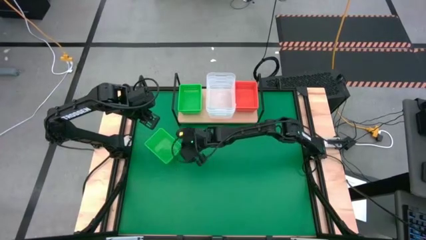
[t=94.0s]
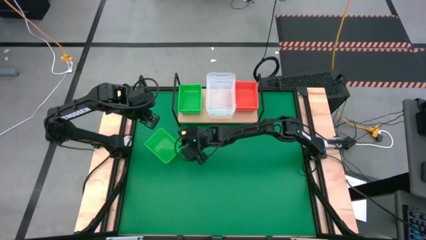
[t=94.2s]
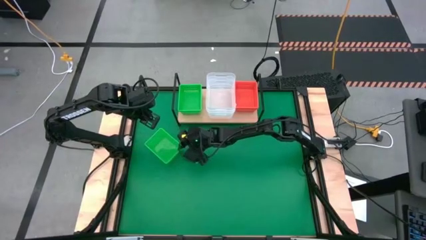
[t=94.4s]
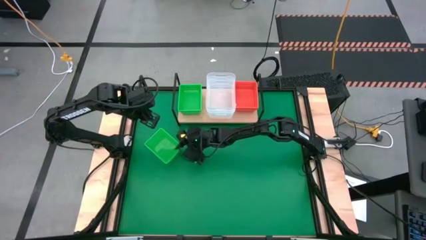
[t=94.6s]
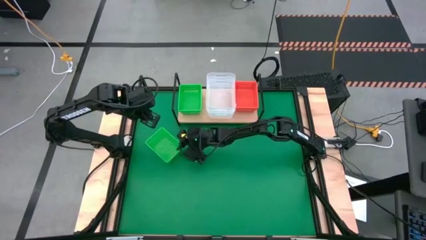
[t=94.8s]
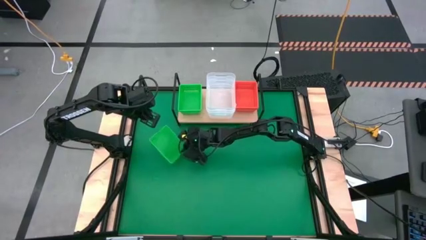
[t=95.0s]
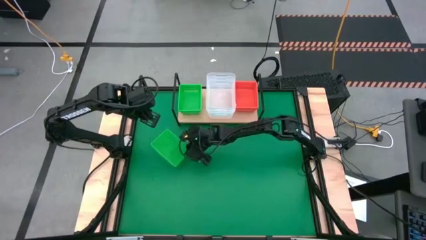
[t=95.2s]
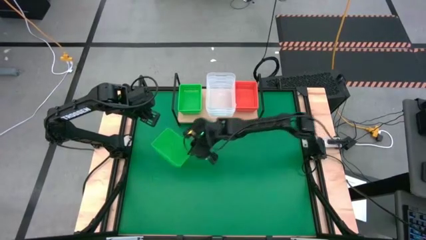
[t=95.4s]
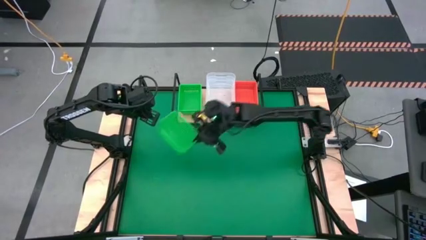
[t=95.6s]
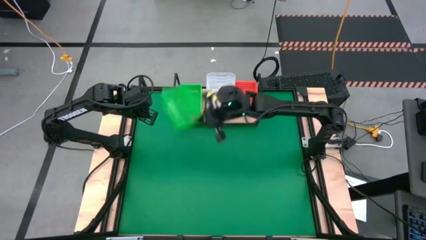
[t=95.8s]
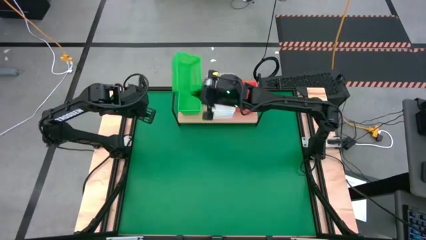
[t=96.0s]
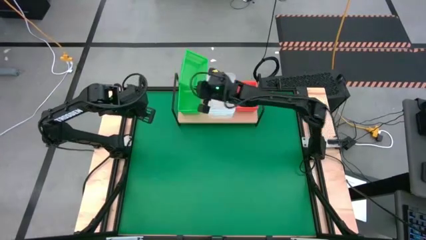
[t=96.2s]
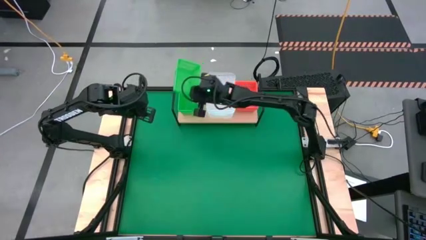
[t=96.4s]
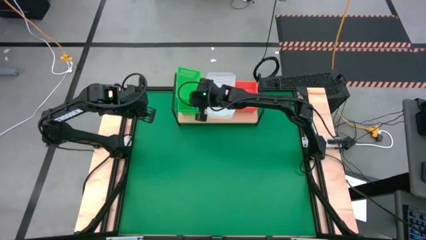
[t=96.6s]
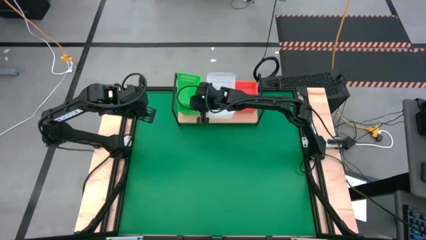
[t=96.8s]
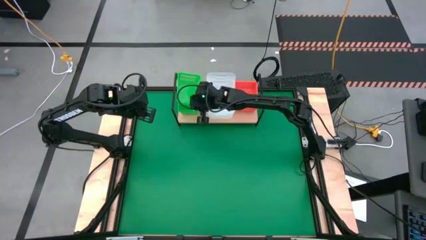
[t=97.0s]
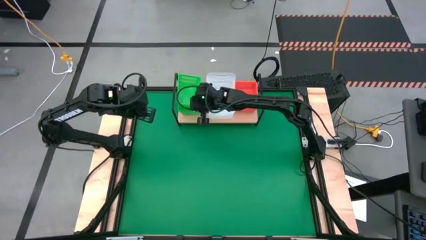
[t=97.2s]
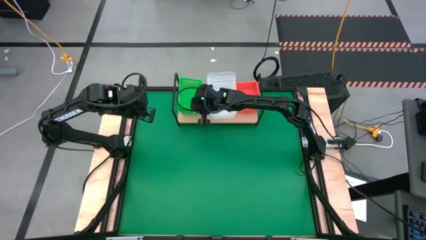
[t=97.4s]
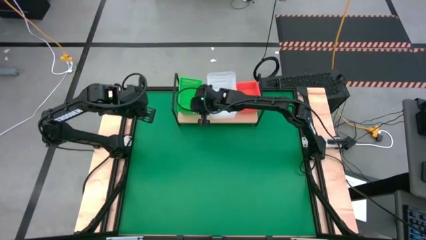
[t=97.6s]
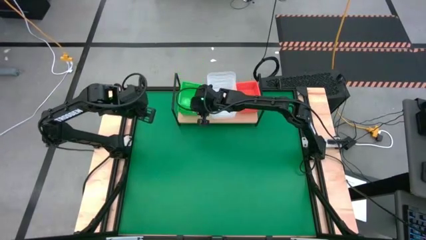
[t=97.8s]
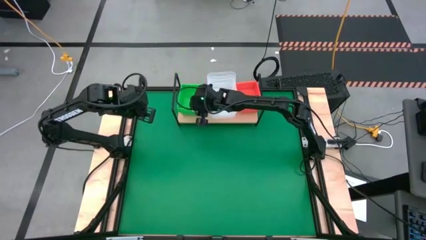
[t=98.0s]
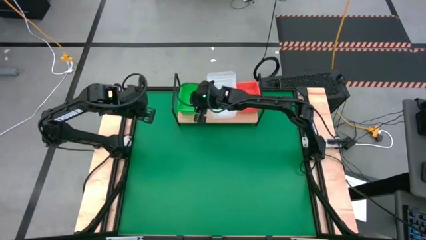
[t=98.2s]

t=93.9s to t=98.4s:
Task: Stack baskets on shelf by color
Stack the green bin on top of the stacked green bins on the shelf

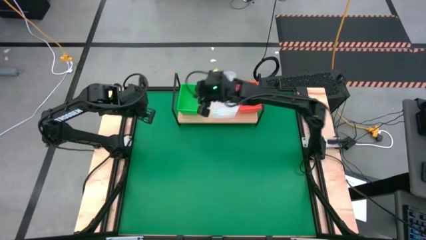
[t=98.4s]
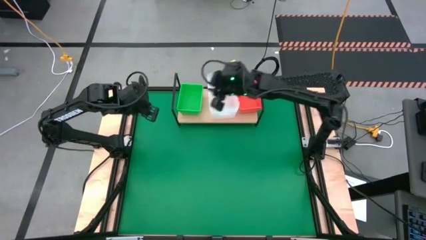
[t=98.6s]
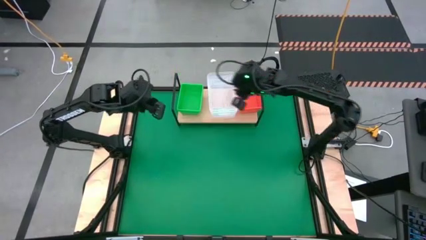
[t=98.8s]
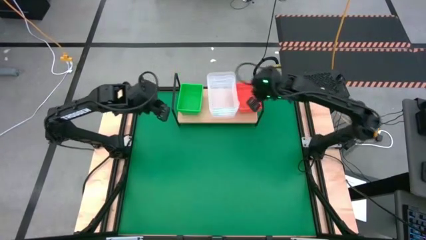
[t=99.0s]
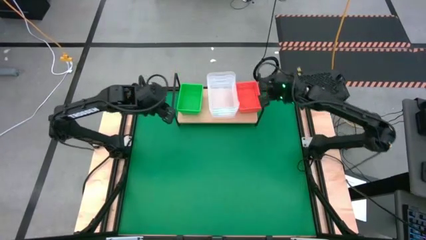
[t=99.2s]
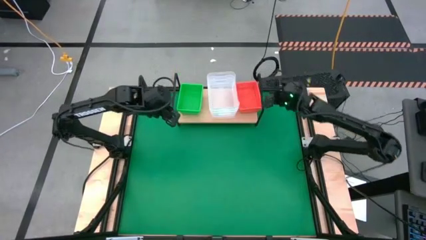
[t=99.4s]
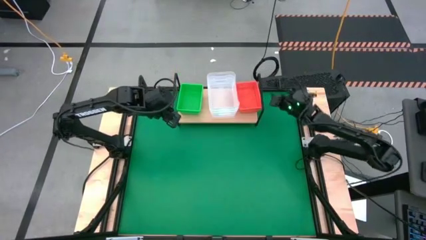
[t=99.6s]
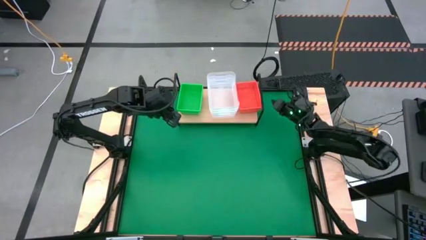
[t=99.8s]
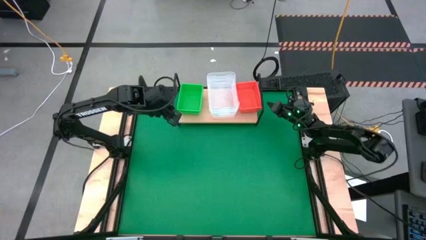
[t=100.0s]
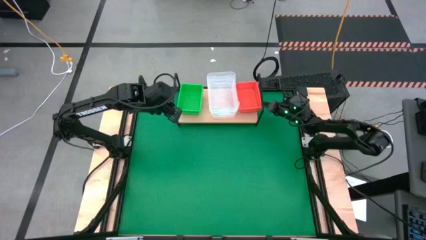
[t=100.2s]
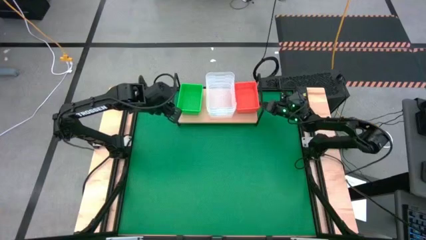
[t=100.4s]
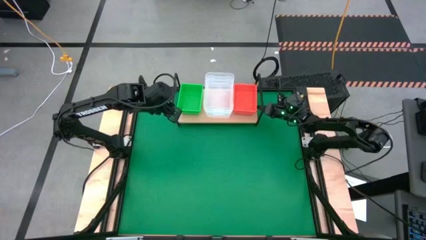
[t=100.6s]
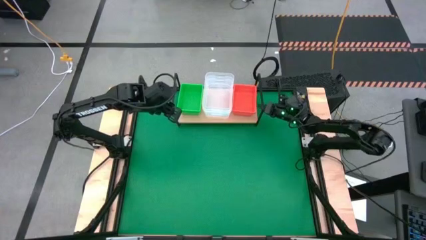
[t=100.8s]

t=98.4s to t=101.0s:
Adjust the orange bins on the shelf

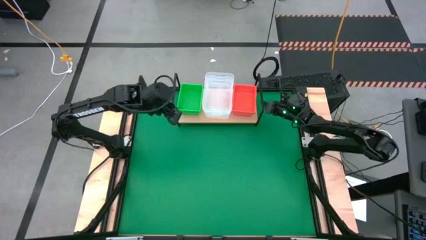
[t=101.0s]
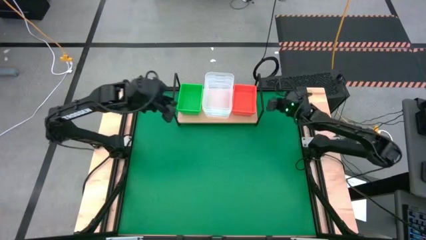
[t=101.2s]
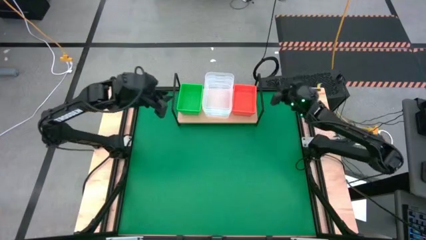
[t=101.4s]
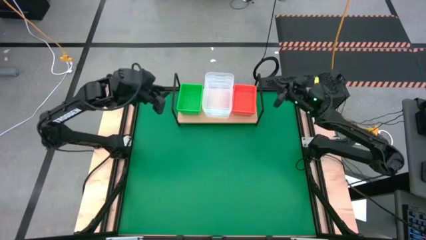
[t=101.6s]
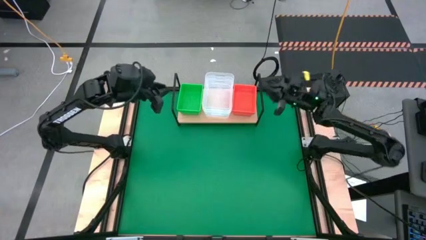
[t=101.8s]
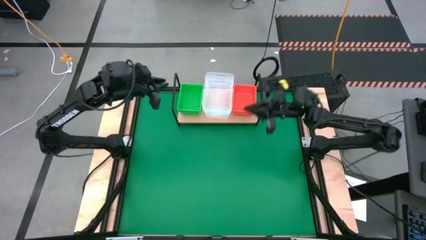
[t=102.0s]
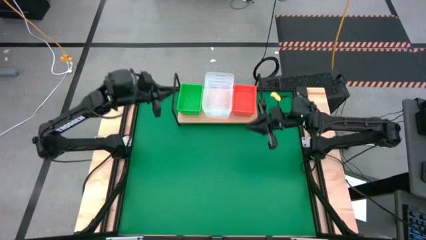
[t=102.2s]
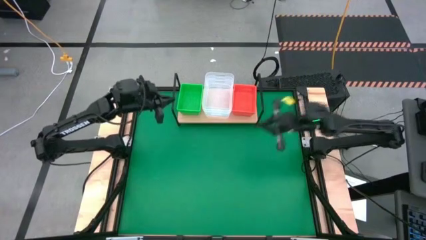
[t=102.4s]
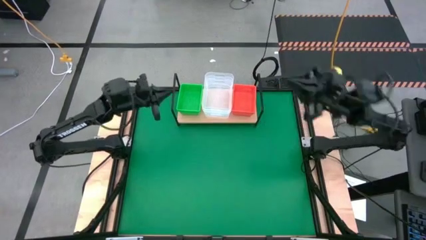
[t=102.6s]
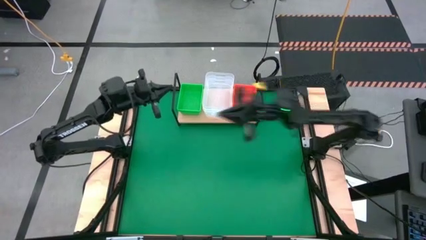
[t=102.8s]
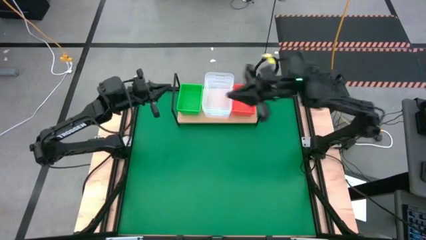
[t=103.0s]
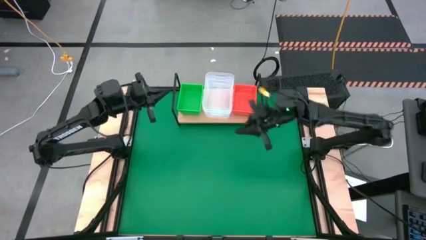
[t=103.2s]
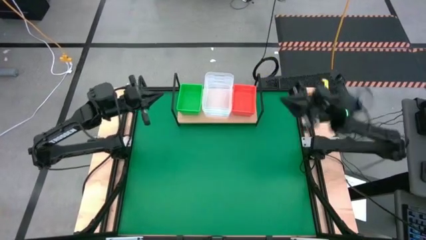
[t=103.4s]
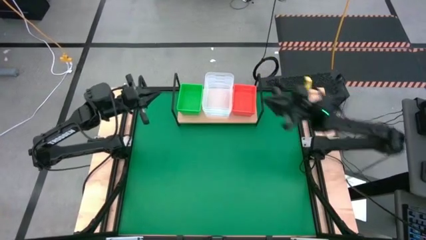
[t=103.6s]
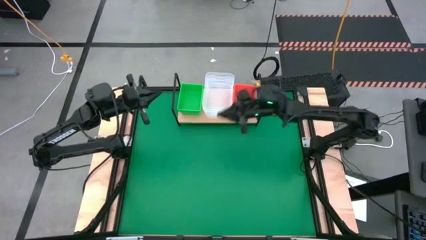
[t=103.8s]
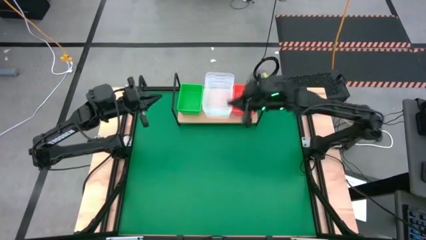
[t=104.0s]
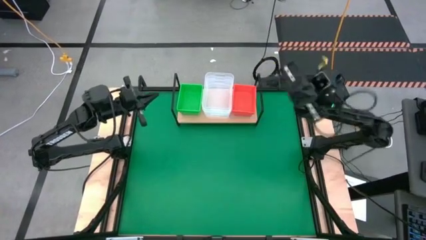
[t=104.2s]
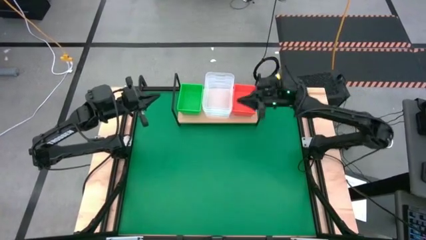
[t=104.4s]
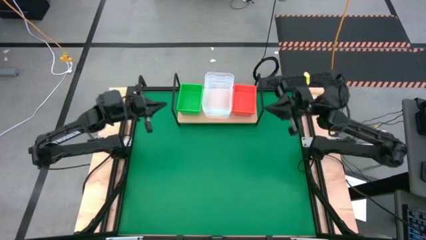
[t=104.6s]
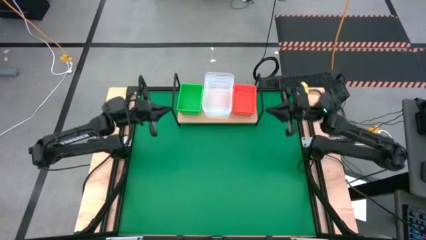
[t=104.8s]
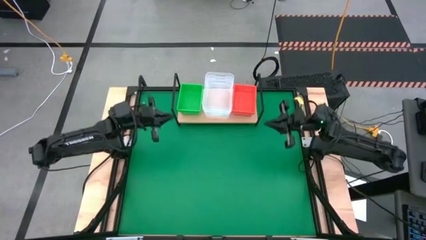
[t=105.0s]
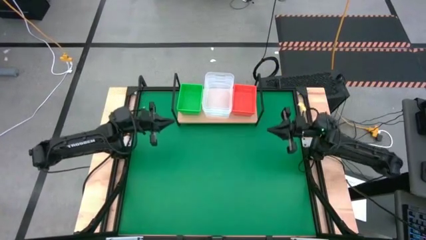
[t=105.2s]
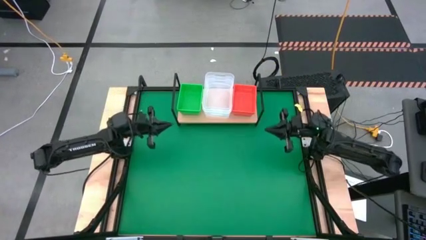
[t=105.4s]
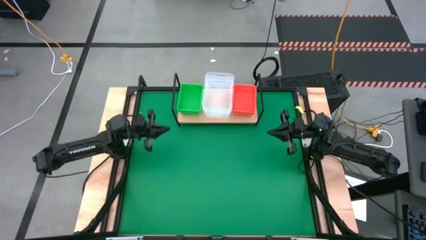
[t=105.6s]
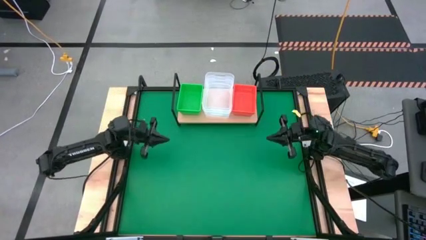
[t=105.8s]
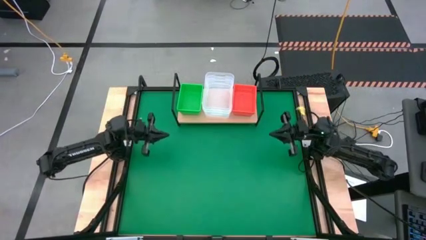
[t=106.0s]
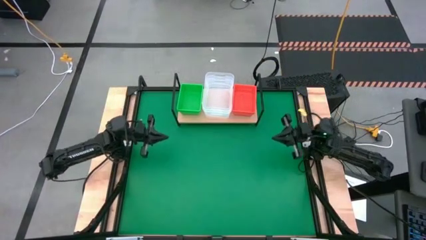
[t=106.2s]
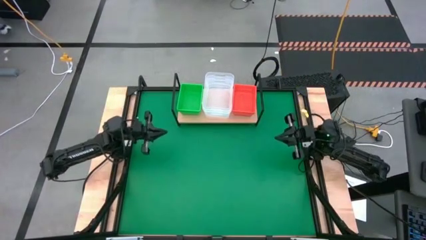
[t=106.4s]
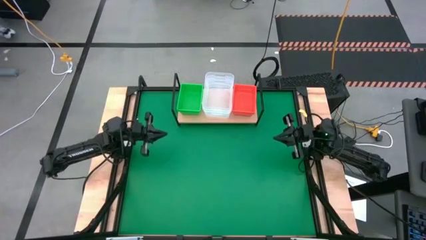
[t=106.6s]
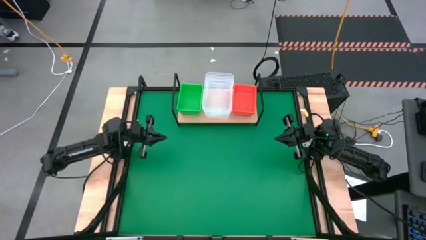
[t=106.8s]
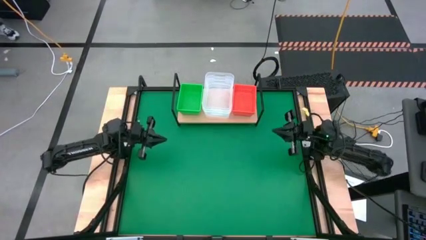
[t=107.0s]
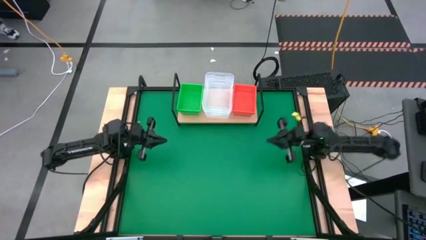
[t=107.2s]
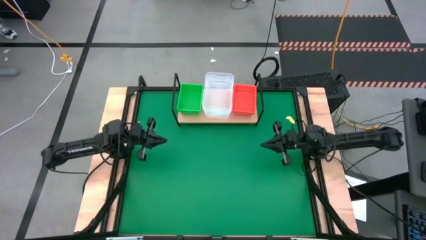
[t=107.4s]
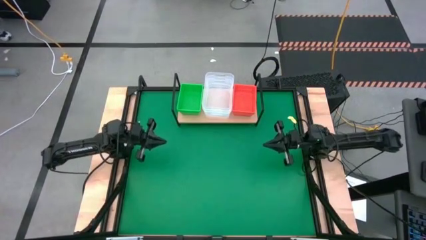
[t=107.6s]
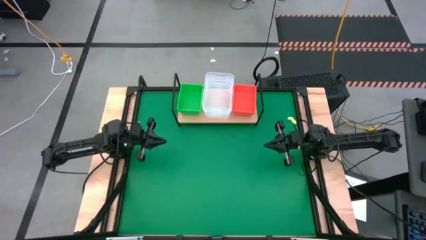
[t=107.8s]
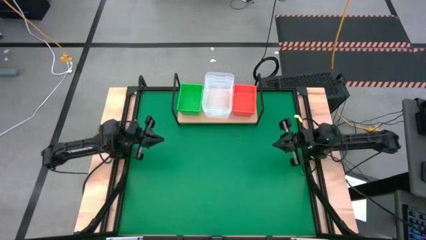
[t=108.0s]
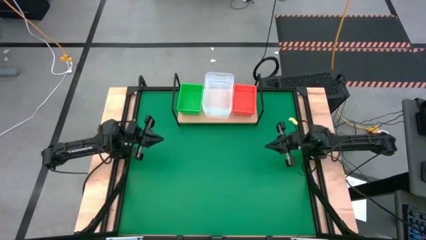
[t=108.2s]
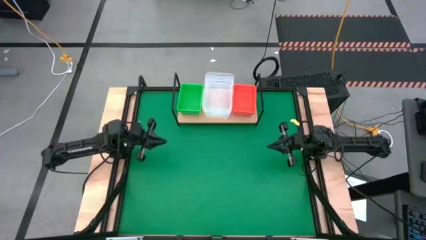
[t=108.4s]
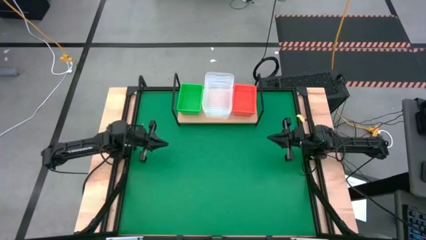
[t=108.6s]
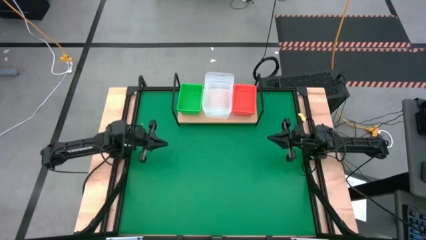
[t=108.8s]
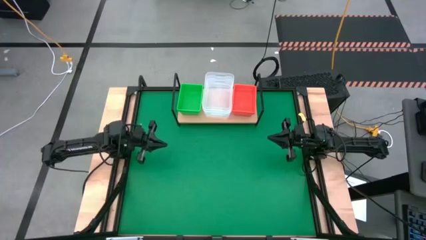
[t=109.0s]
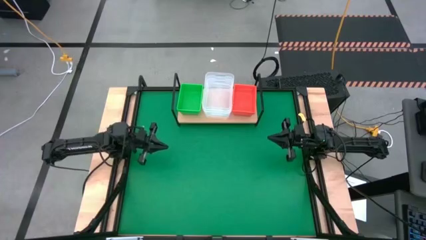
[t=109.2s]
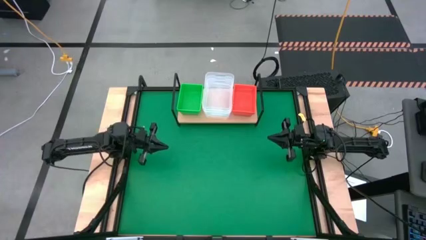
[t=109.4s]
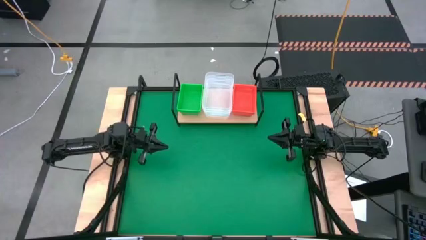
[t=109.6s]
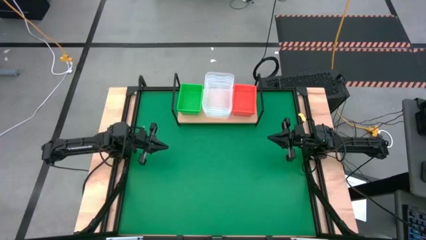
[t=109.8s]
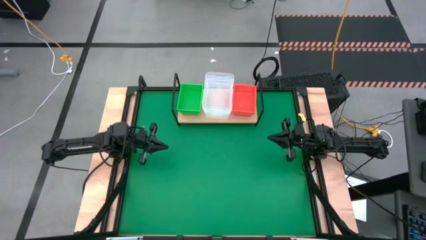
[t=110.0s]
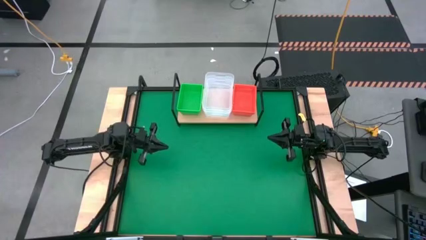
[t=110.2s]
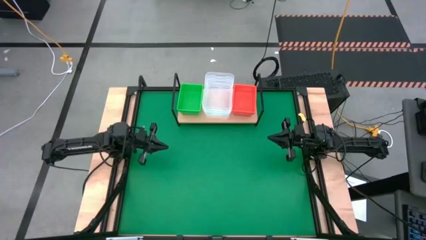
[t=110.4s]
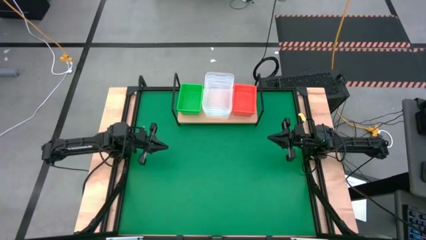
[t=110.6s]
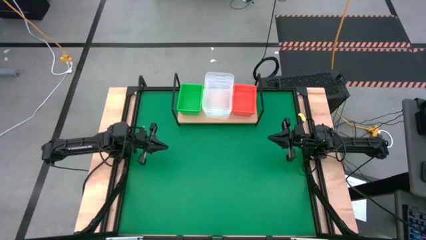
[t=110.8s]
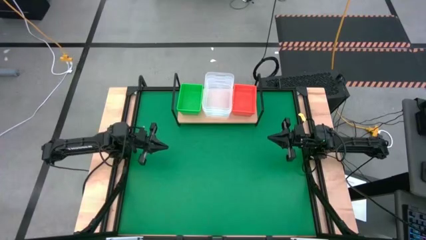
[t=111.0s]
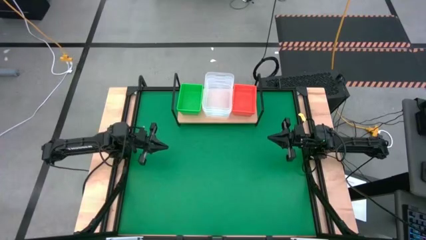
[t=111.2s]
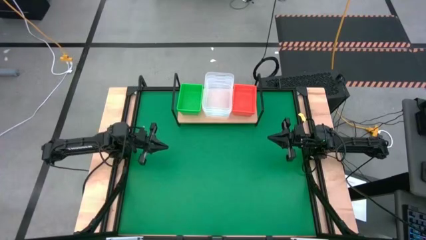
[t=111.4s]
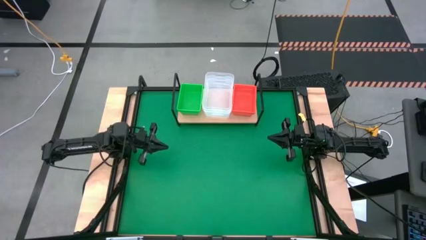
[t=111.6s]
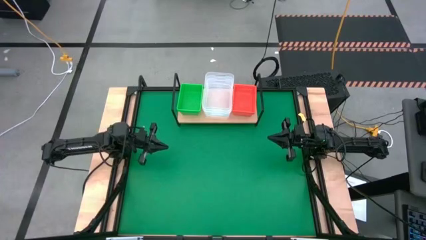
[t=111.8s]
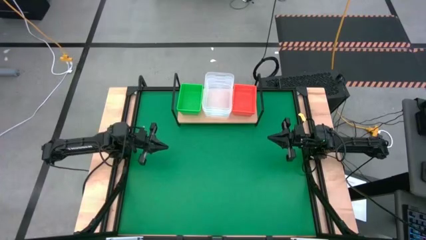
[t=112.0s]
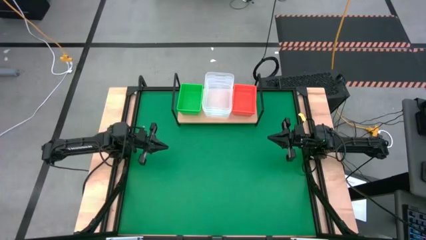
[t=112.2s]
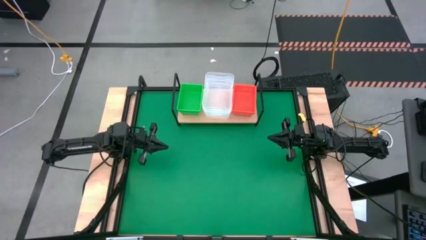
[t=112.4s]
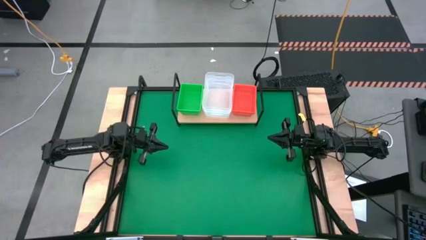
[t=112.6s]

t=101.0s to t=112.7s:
Return to Home Position
